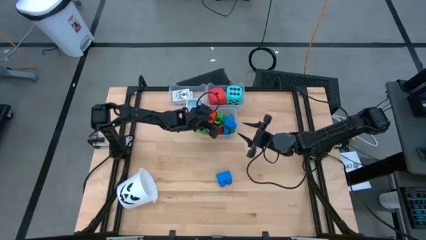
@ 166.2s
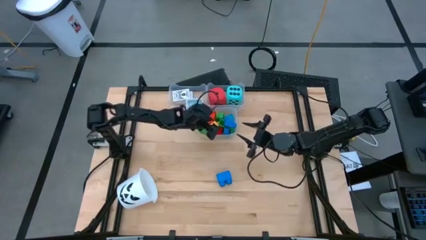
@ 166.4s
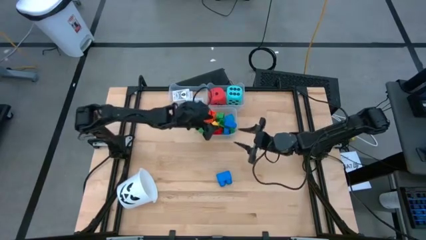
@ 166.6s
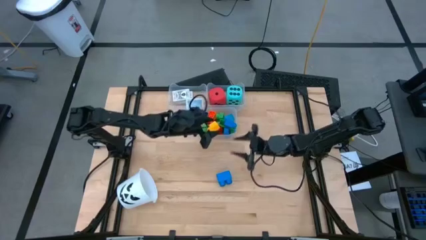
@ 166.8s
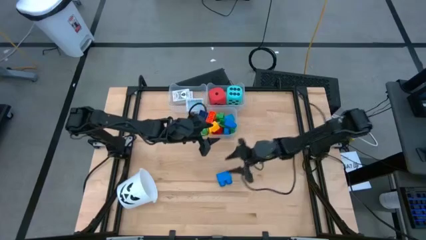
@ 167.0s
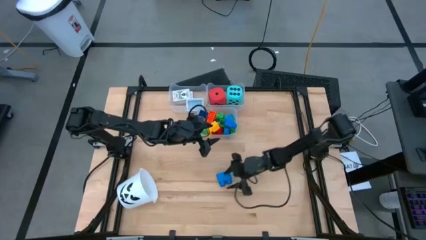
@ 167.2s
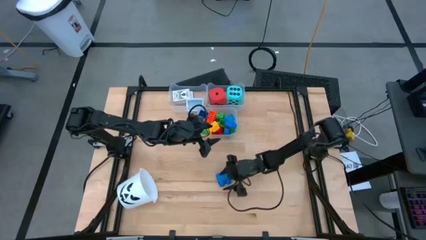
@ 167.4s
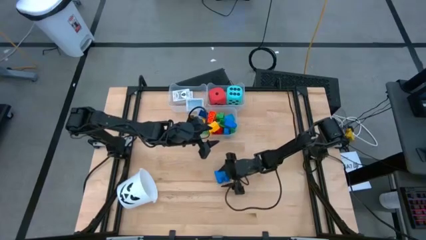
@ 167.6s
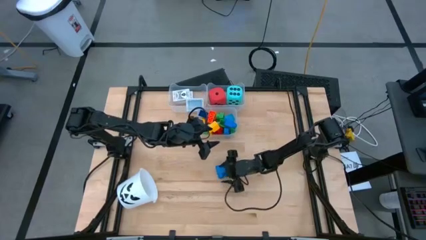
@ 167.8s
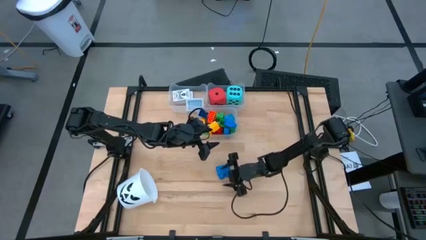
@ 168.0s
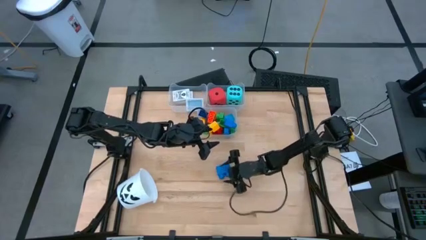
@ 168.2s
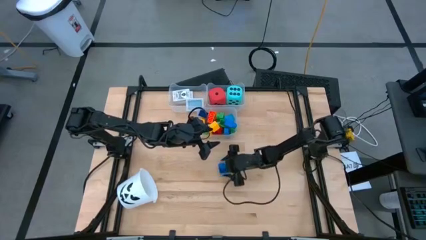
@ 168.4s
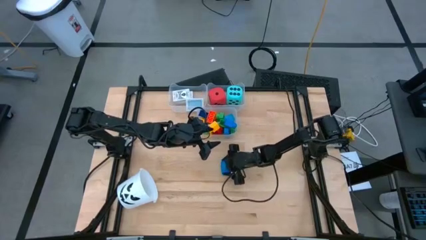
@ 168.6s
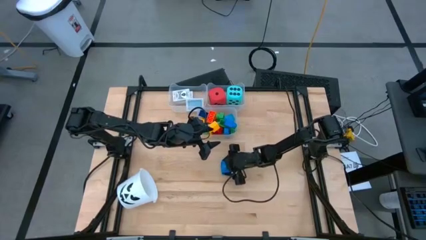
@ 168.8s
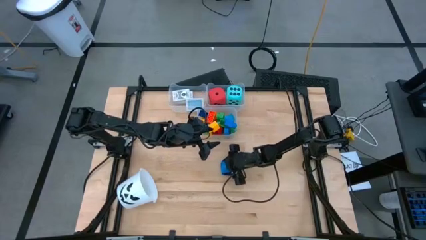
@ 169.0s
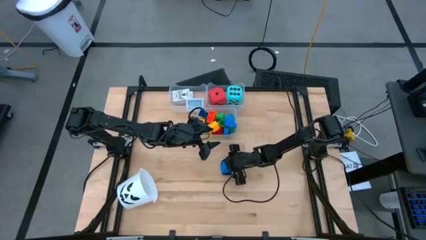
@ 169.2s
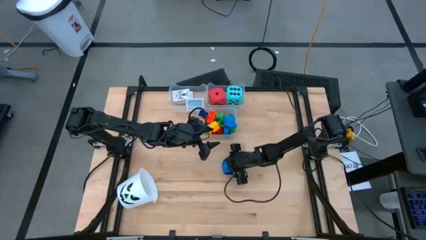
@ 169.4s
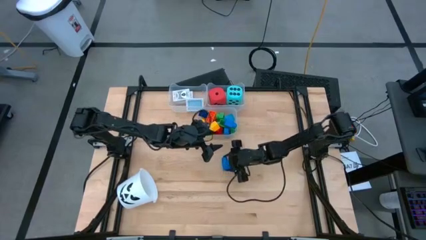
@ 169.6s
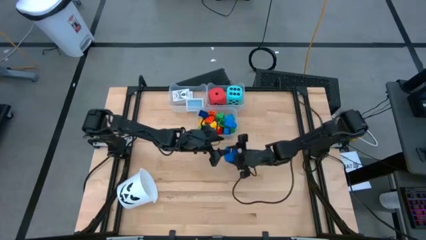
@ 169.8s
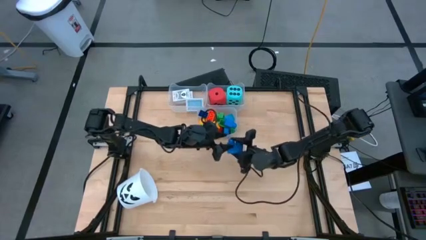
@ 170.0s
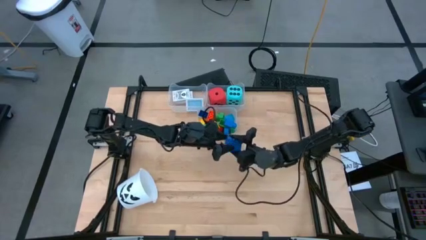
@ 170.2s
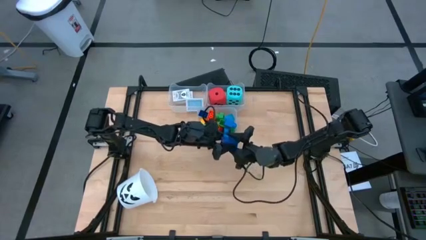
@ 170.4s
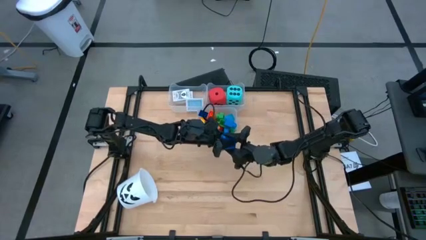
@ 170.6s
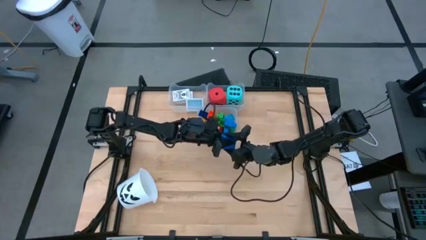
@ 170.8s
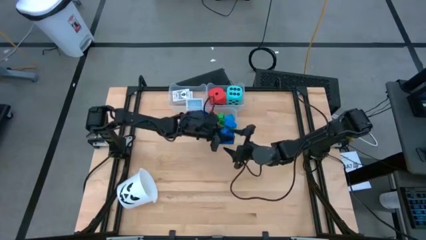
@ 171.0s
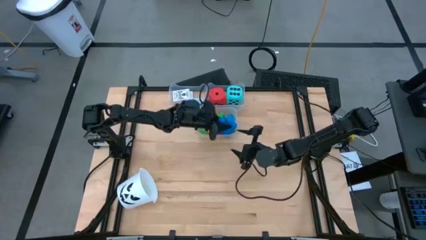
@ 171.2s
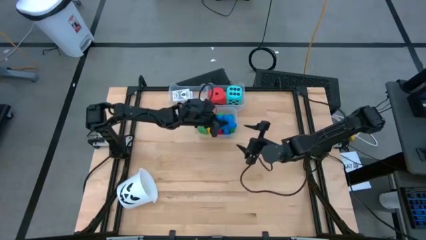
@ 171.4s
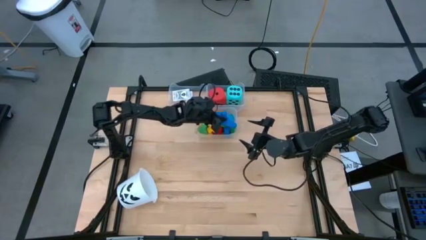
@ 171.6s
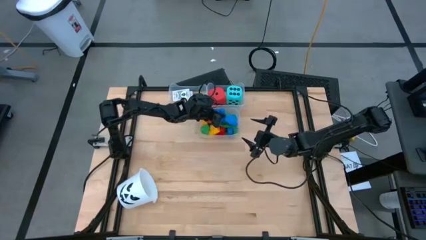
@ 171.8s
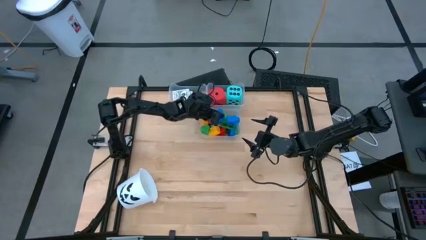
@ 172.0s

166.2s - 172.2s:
Task: Pick & Place Toys
Put the blue game piece into the bottom transparent bin

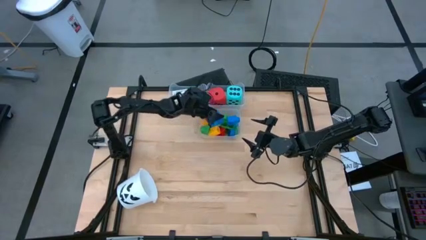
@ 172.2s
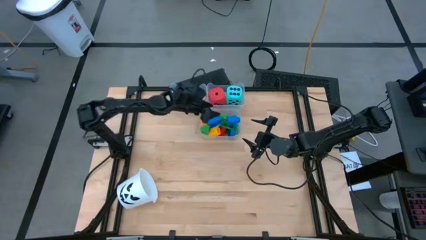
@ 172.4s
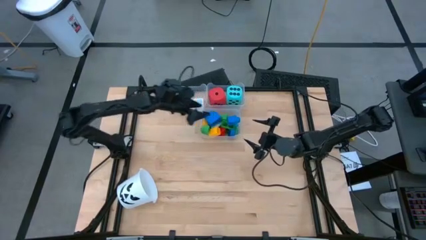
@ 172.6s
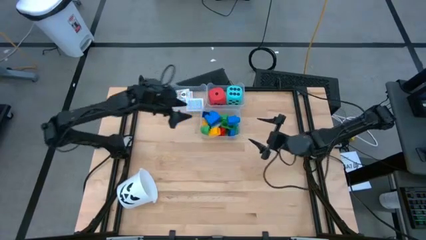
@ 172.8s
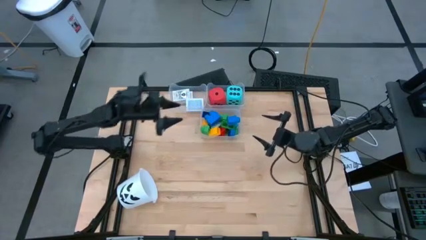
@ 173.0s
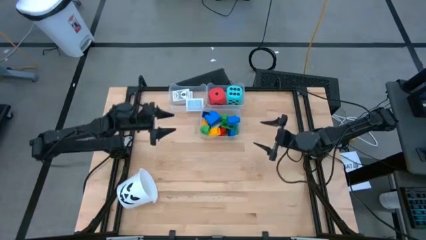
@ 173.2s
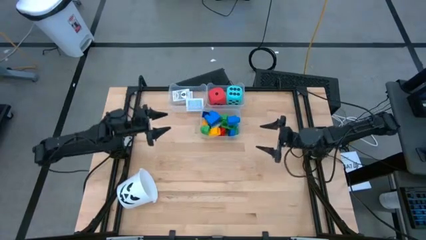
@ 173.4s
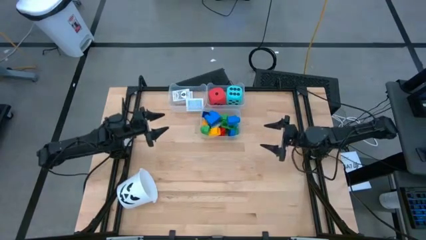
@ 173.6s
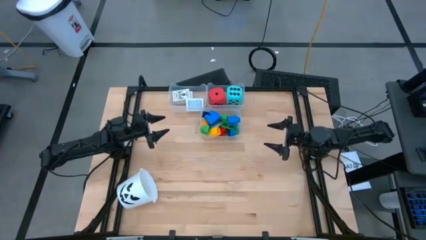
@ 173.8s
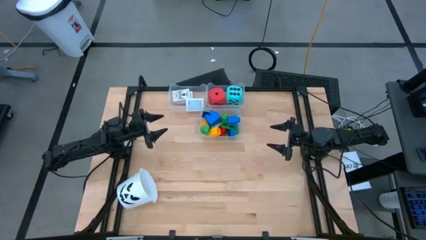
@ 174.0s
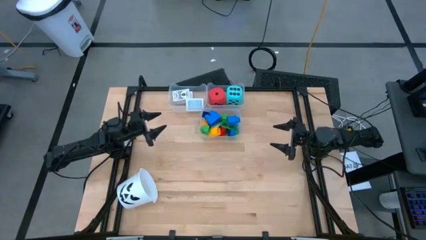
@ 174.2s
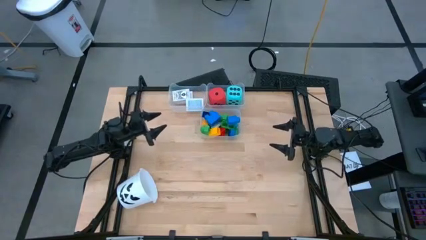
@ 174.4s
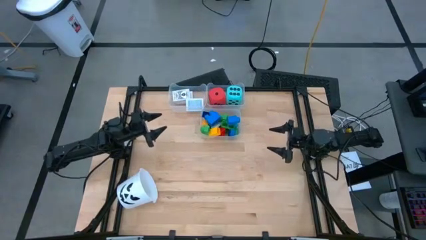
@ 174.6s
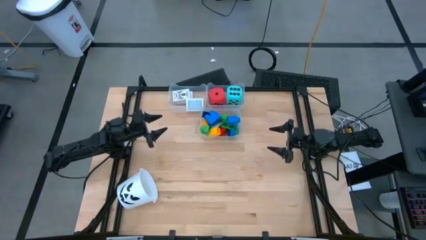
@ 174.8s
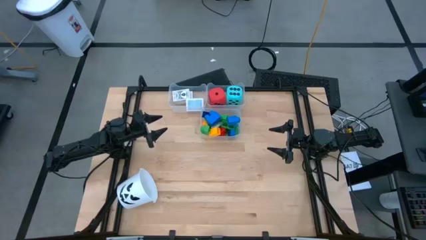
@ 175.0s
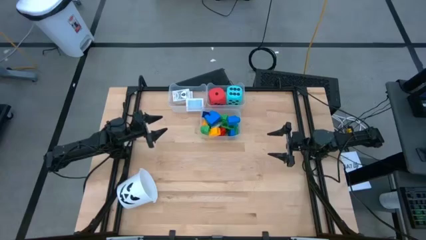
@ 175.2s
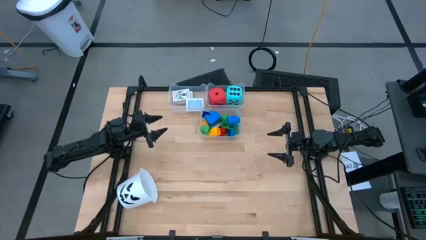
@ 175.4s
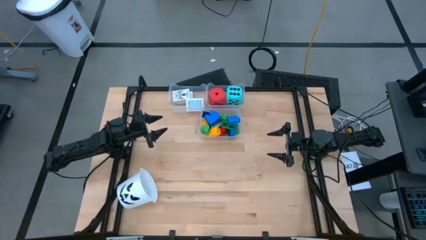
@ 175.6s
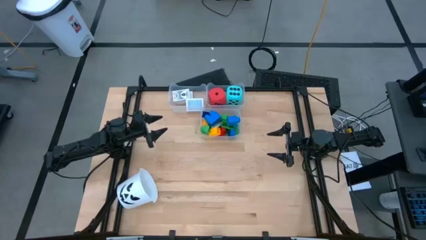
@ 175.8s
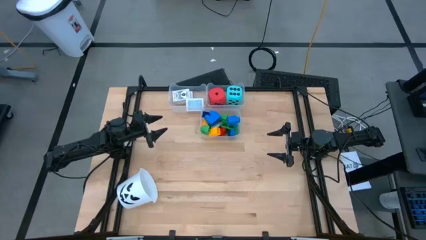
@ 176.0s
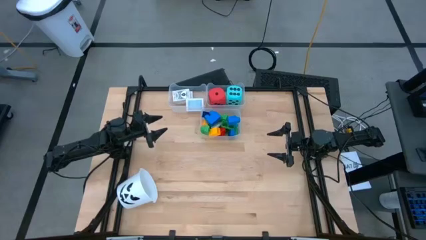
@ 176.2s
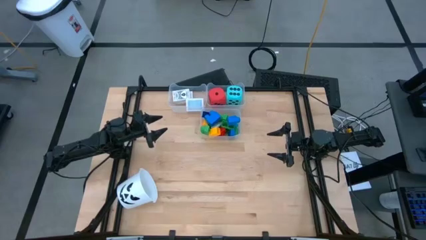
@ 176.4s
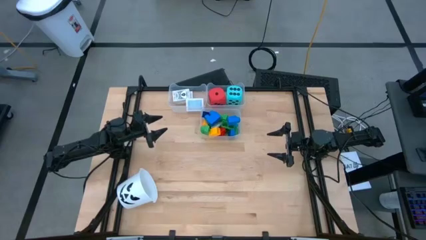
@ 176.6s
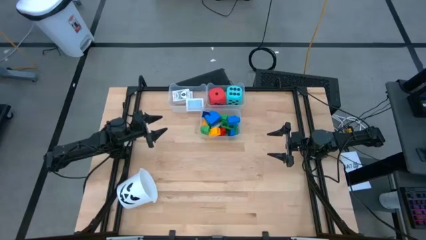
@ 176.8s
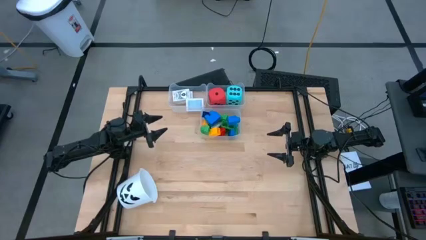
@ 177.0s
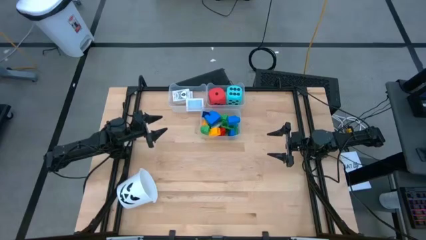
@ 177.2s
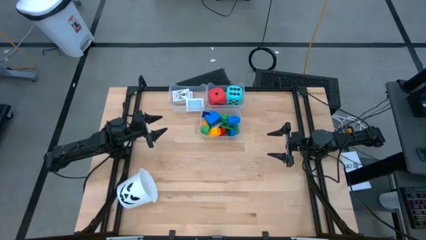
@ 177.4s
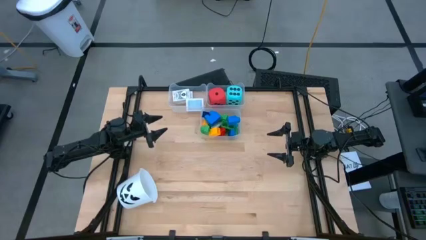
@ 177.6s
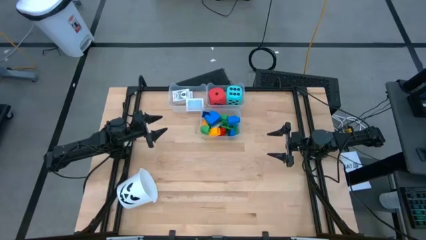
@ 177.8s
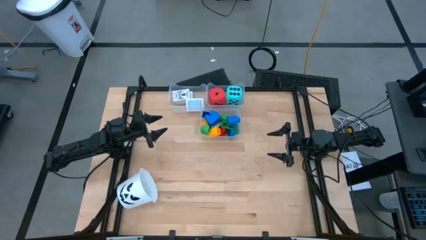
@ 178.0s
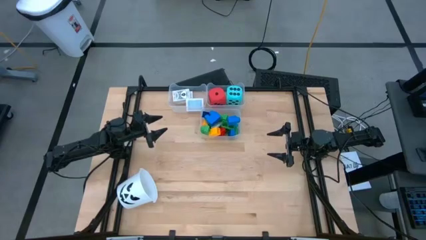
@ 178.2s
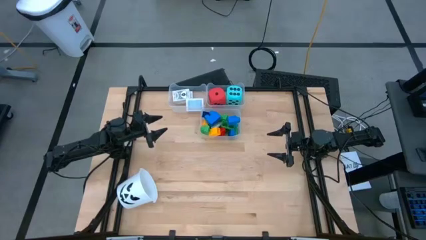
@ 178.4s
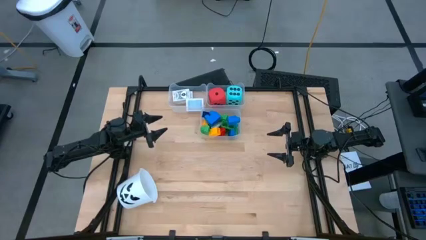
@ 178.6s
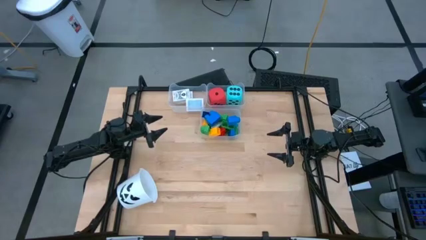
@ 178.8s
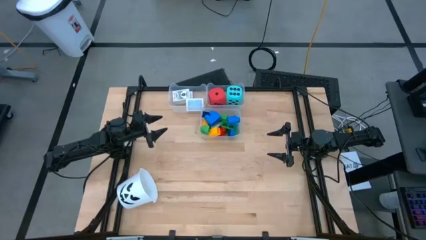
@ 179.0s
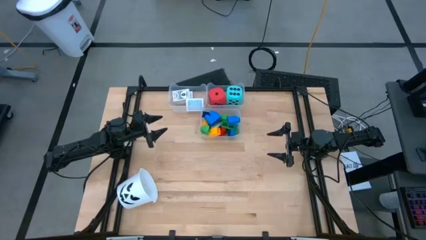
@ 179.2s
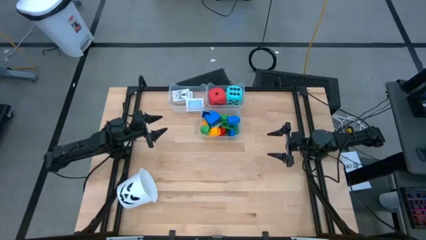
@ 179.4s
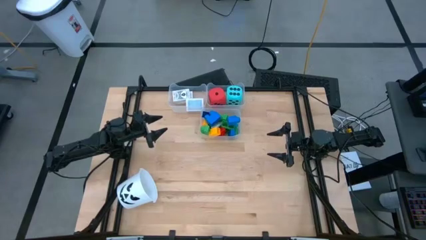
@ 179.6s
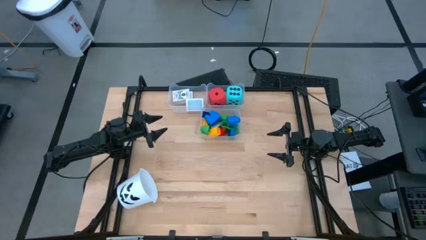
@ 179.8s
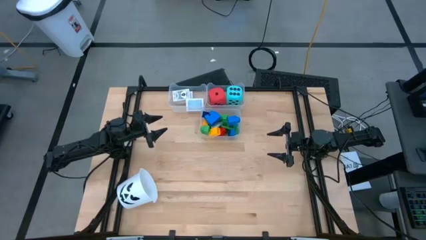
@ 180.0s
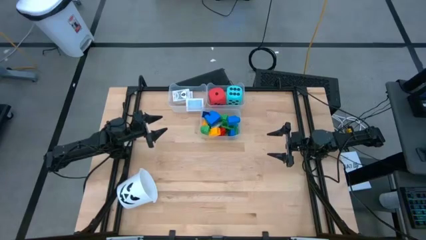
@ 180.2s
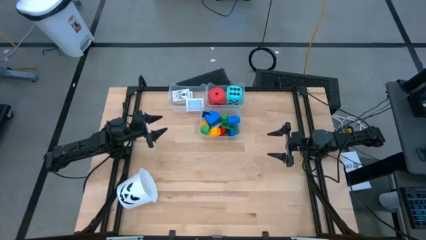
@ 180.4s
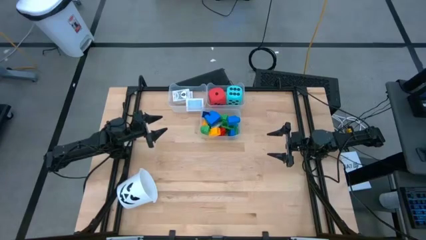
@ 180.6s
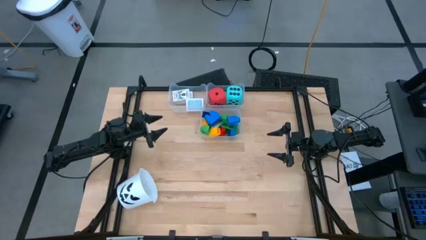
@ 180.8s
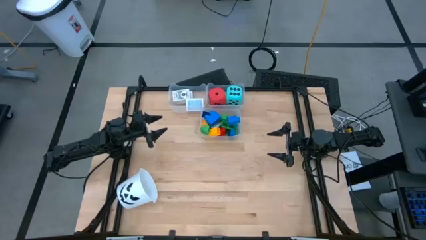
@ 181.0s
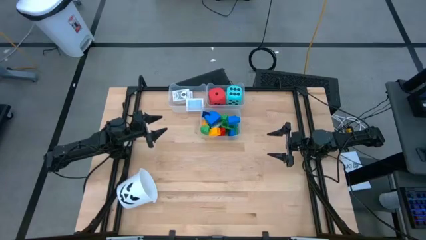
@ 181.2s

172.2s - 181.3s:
Return to Home Position
